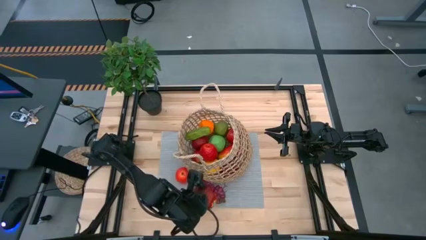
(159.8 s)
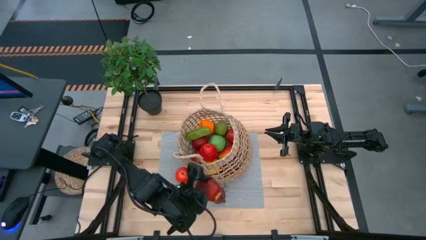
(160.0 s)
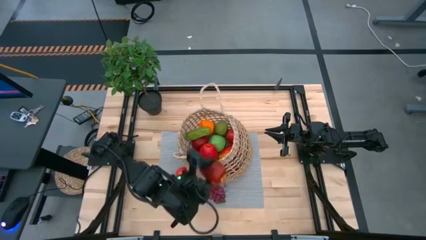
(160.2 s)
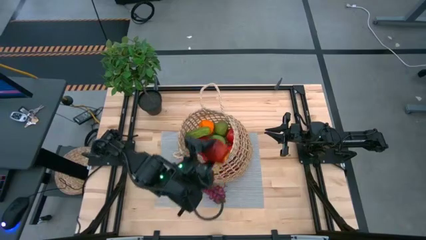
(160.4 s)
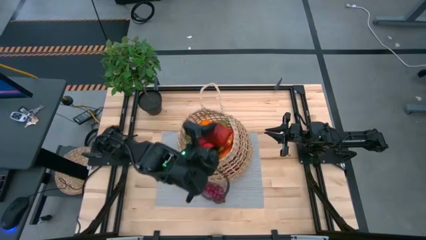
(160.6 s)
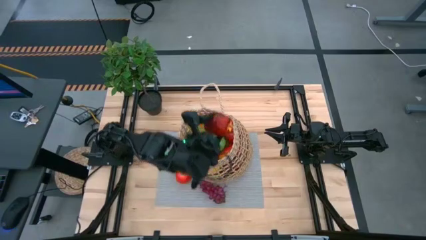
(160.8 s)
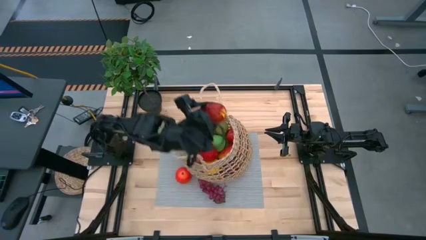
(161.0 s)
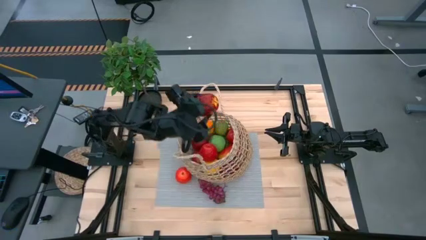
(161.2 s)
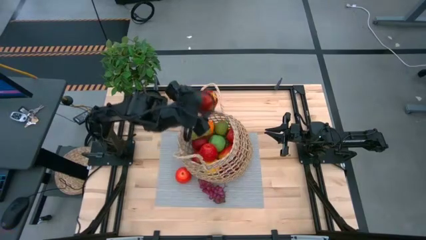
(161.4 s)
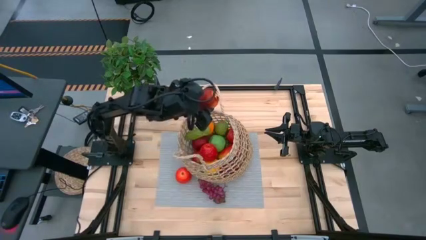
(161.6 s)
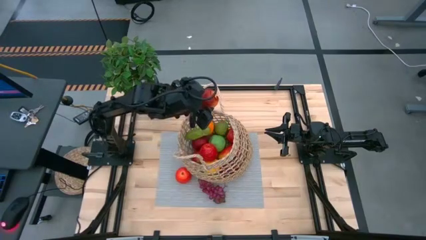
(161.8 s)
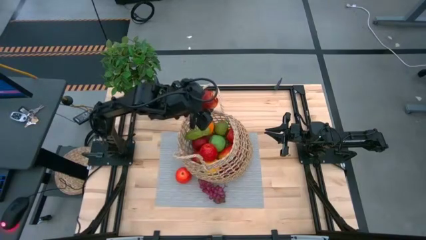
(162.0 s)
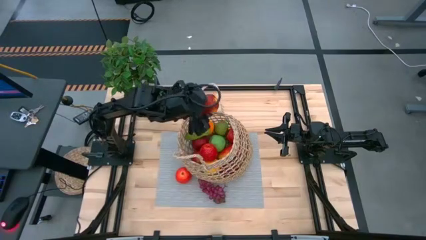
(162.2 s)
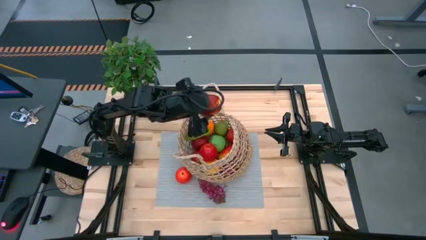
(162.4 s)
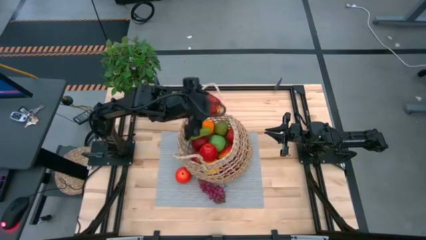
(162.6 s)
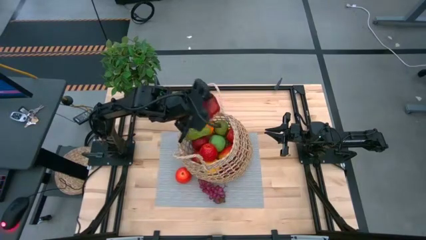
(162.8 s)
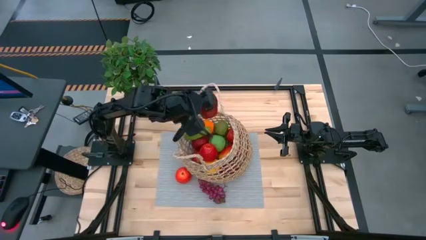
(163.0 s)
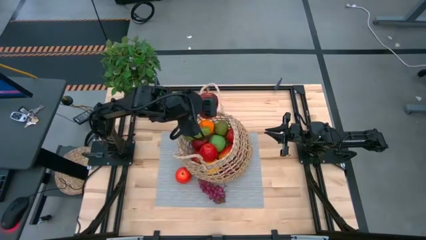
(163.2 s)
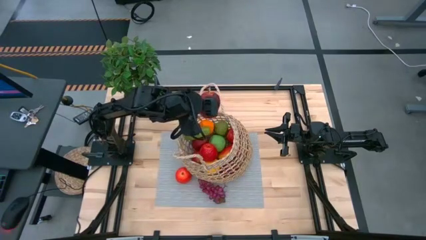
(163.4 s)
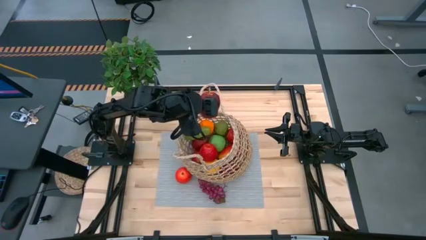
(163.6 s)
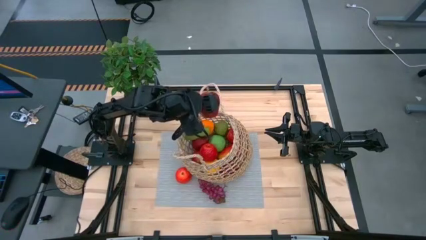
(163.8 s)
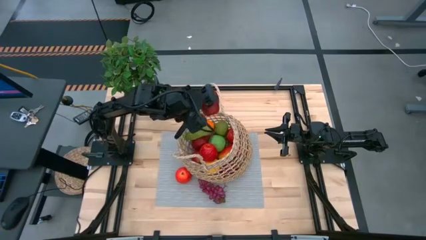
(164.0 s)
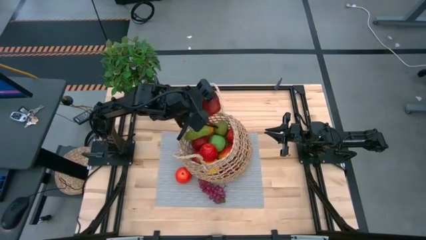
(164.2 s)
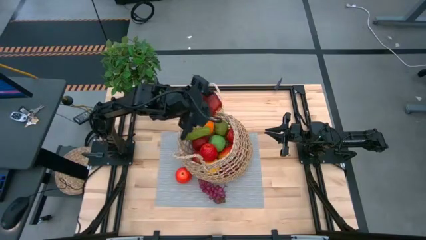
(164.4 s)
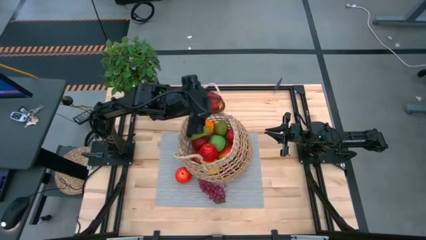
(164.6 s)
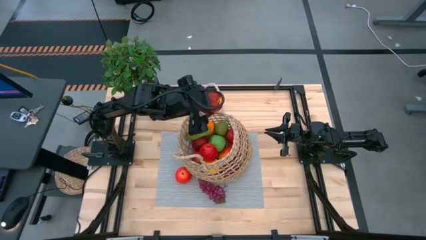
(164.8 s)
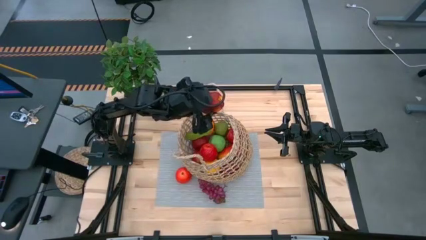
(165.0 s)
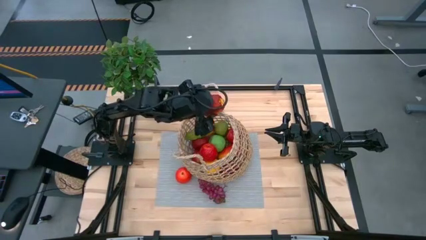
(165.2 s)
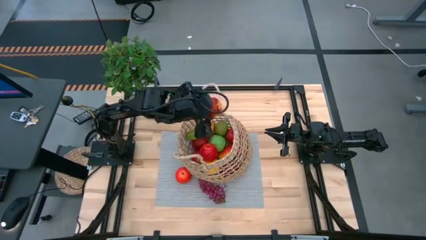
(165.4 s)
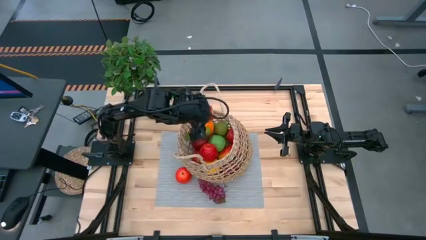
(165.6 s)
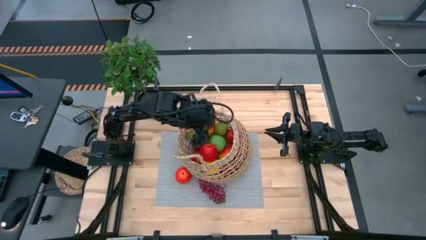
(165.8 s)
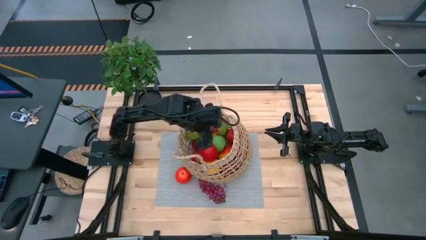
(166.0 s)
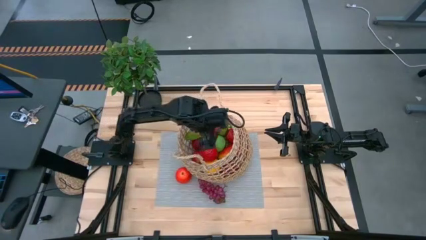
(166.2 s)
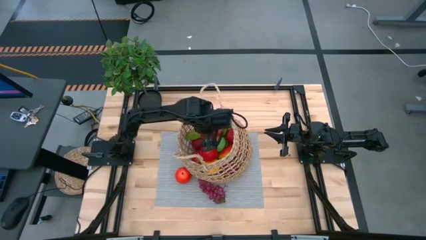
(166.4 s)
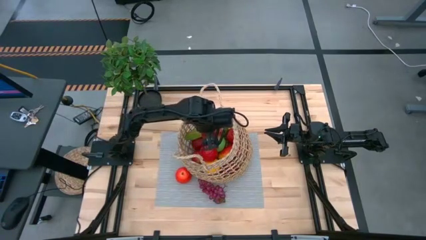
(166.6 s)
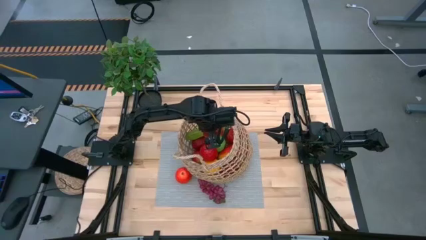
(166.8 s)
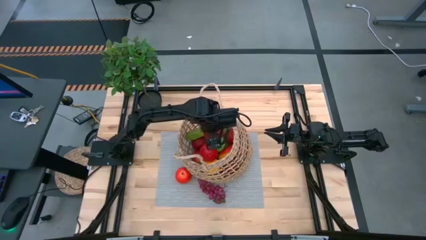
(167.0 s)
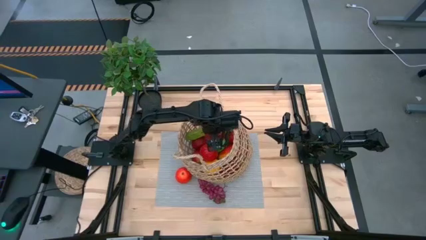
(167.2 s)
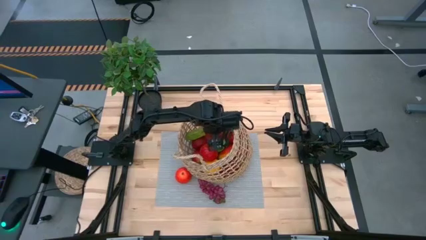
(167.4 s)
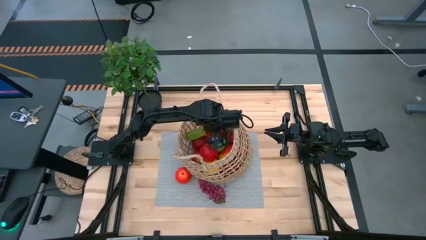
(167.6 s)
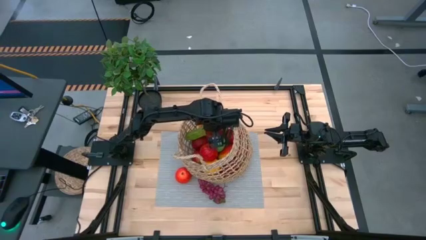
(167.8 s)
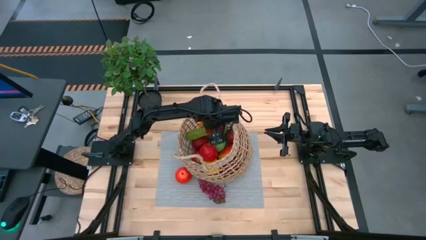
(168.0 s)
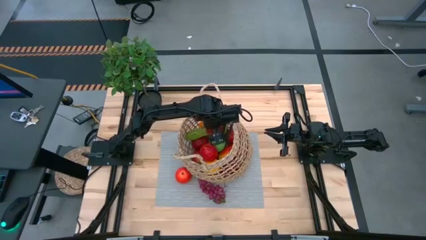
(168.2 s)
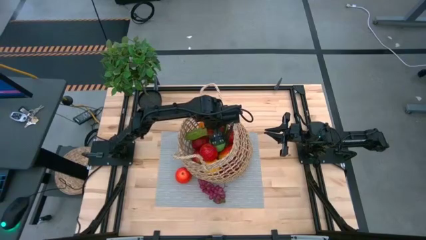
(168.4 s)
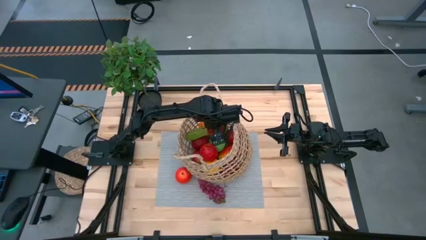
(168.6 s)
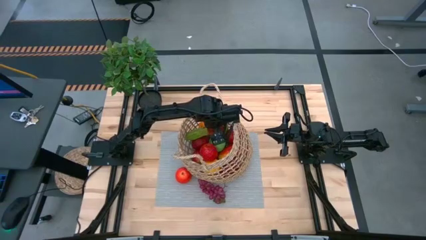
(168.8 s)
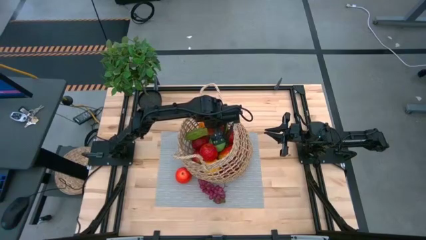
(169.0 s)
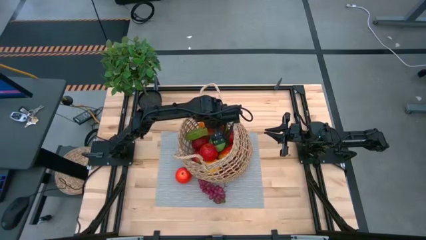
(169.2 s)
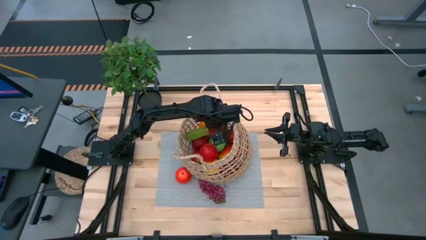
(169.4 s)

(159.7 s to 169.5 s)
Task: Build produce basket
Put the red apple into the basket

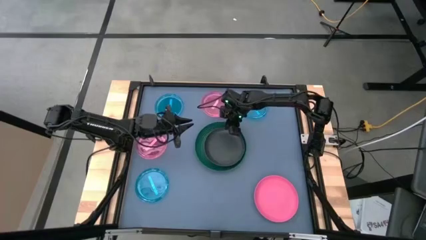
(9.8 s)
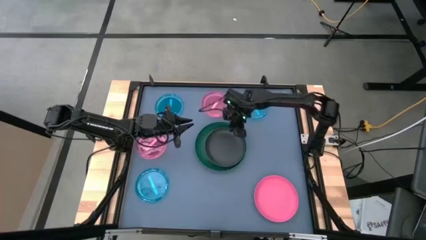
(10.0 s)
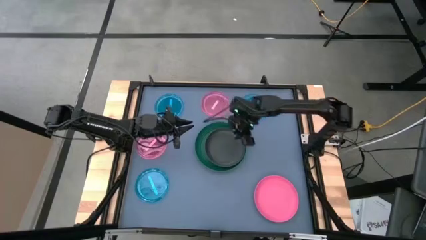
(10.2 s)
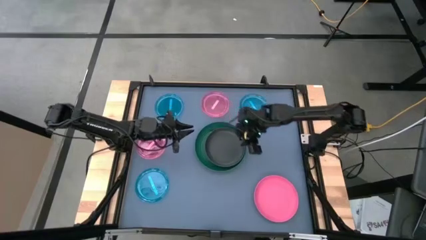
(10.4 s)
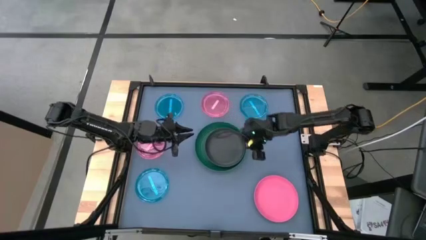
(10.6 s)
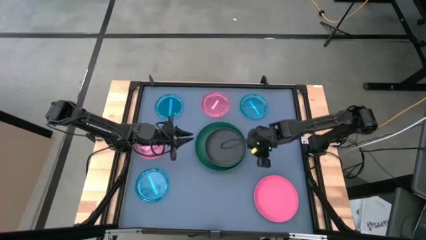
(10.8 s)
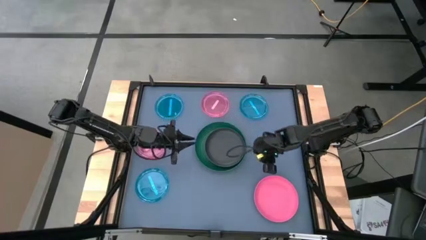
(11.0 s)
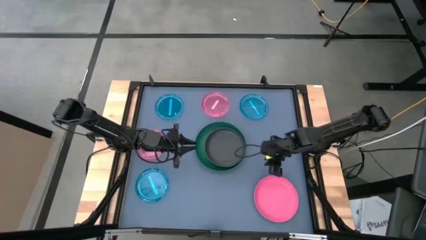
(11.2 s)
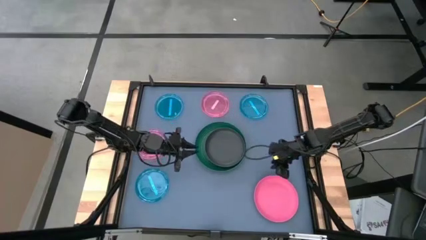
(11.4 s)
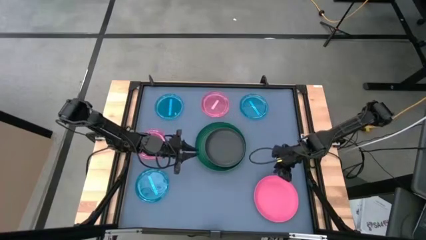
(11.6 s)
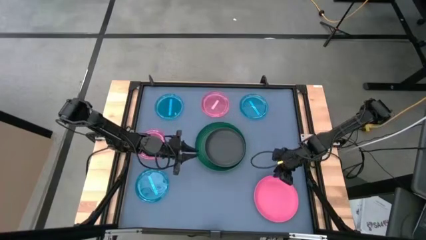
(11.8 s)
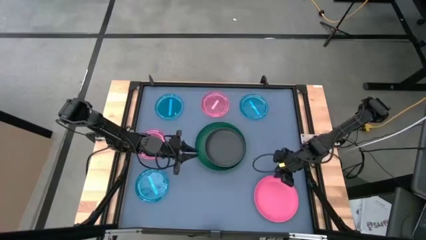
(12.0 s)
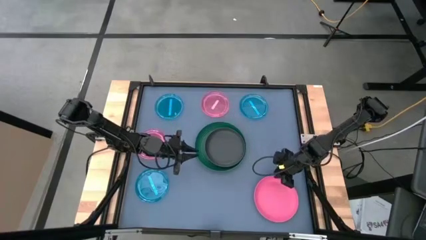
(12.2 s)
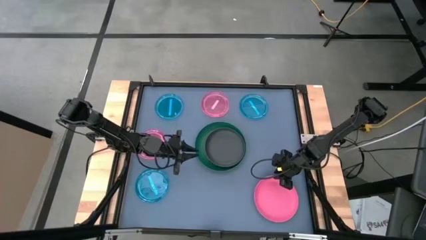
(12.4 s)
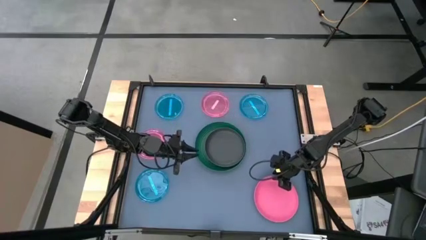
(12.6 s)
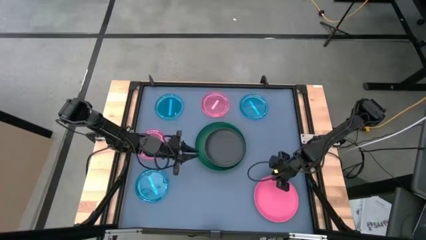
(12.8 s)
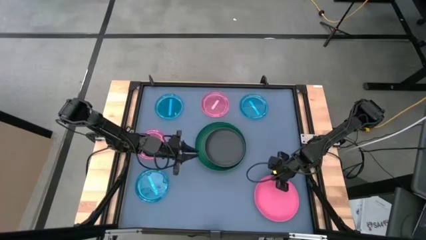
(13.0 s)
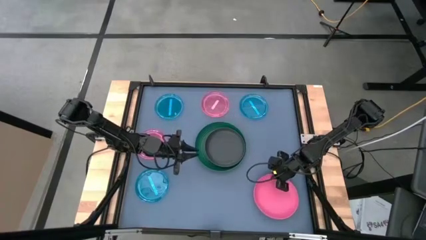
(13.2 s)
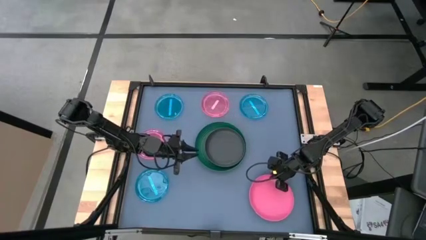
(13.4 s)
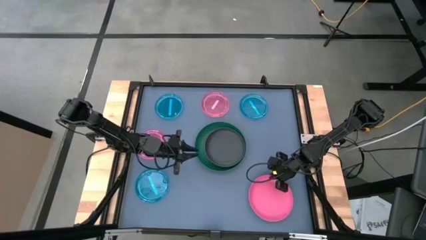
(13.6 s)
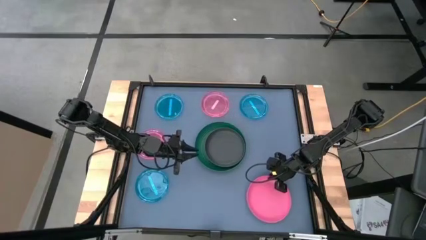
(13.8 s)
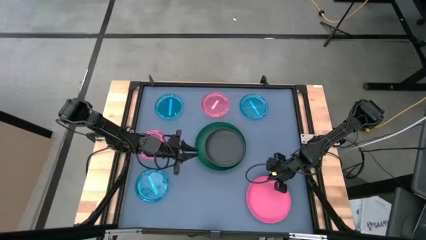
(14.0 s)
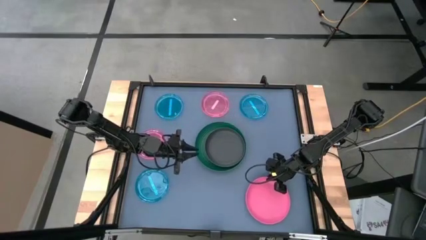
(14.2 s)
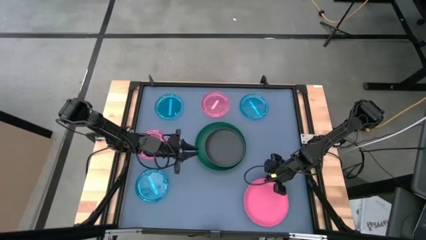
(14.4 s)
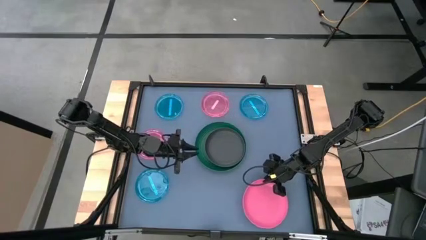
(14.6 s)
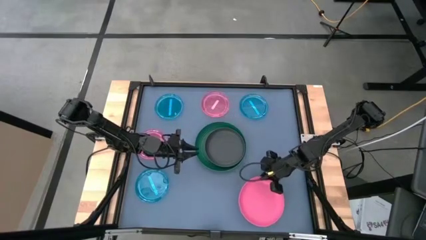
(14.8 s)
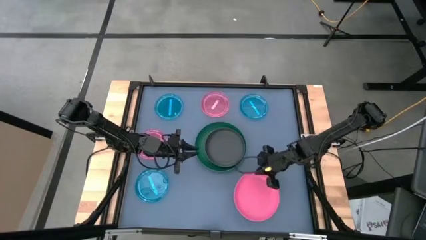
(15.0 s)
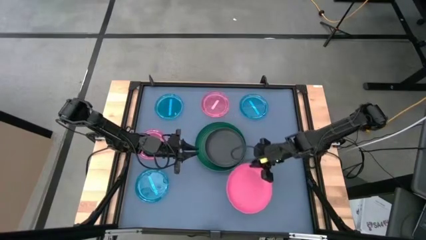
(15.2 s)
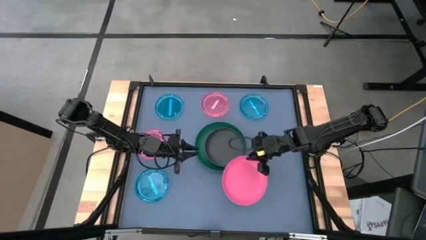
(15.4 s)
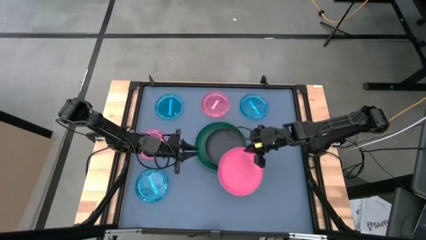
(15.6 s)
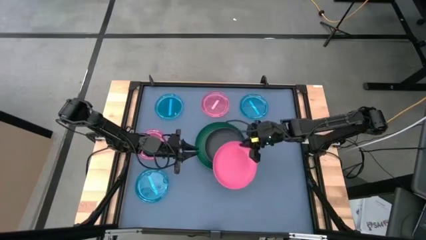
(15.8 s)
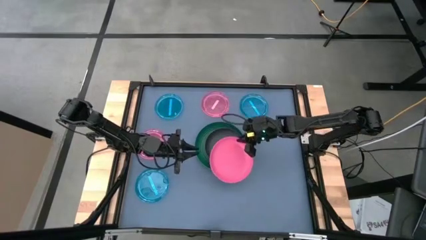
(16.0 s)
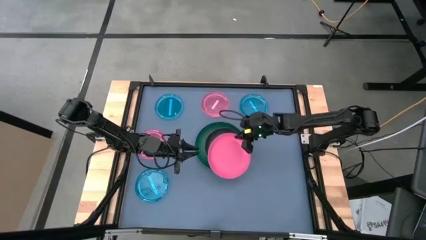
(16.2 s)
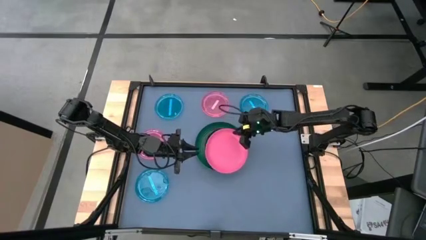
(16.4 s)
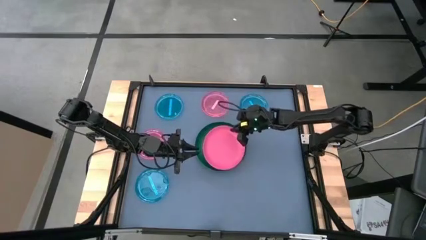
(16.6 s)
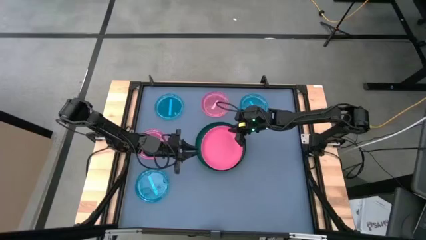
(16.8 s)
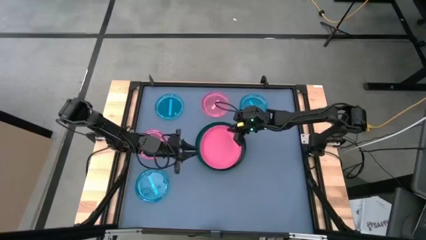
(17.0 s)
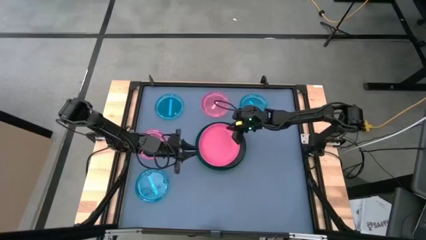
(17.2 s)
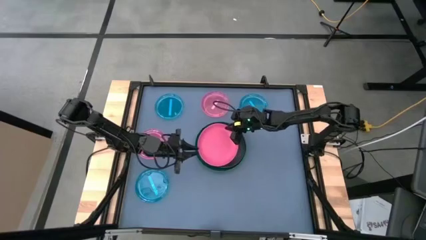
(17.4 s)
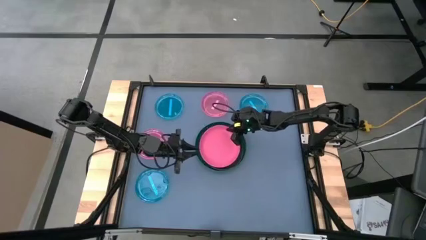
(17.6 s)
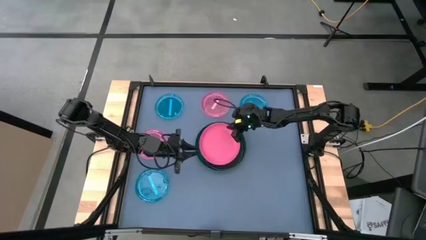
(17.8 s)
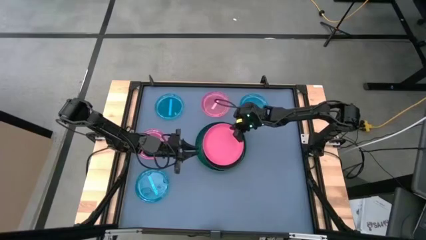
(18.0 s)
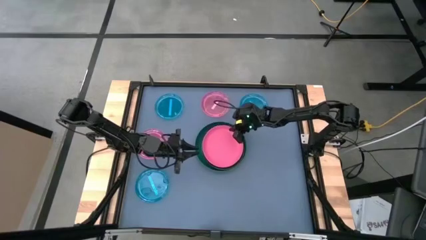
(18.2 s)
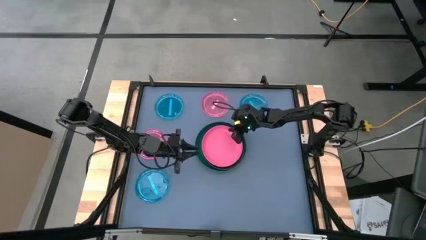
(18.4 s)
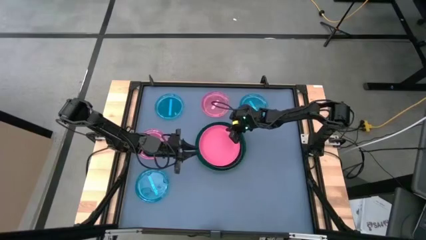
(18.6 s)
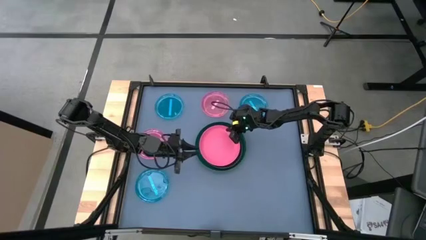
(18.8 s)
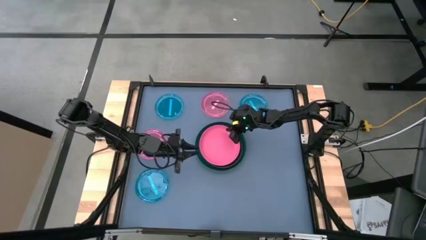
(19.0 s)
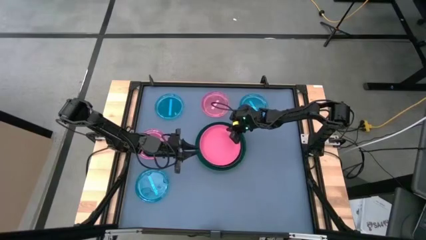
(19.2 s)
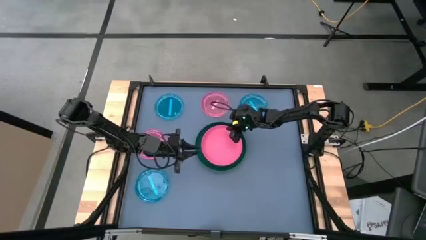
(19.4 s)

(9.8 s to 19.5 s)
Task: Stack plastic plates
Stack the pink plate on the black plate
